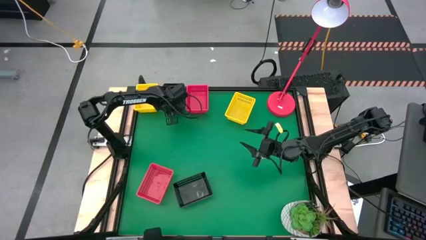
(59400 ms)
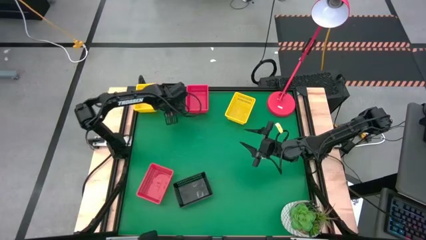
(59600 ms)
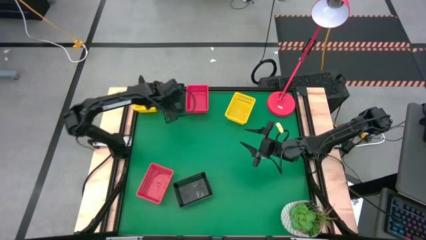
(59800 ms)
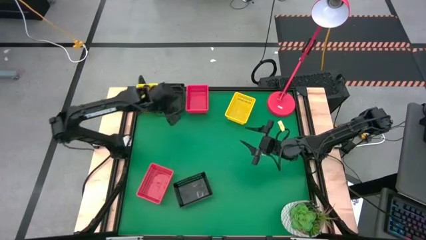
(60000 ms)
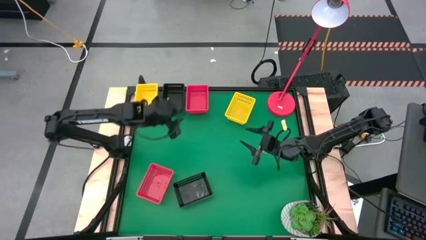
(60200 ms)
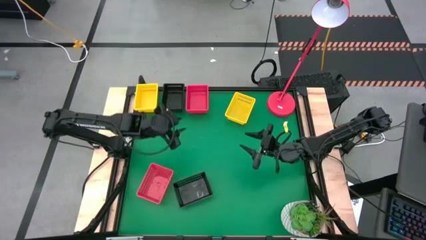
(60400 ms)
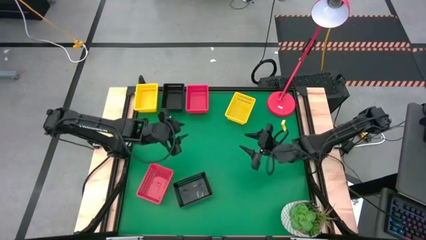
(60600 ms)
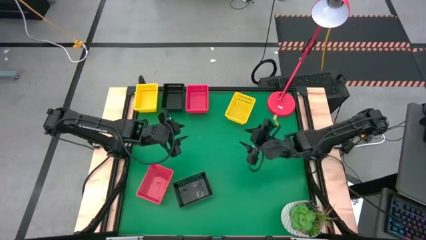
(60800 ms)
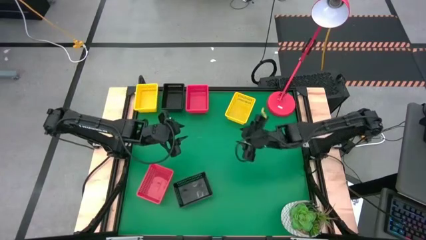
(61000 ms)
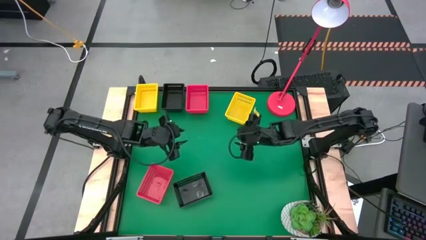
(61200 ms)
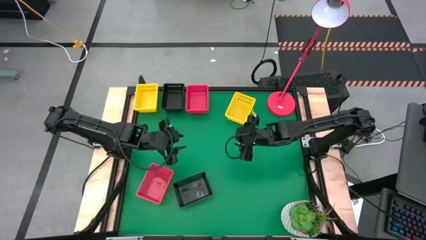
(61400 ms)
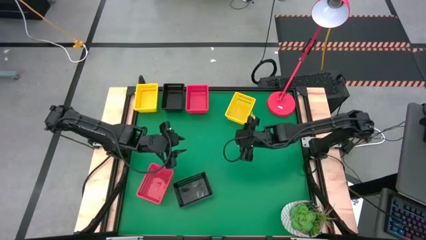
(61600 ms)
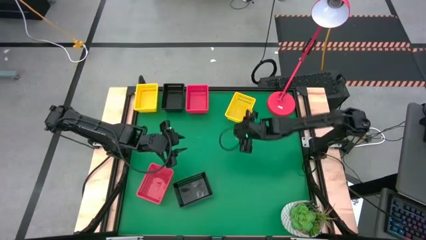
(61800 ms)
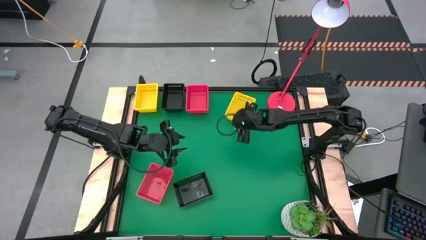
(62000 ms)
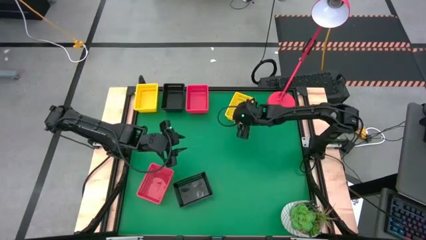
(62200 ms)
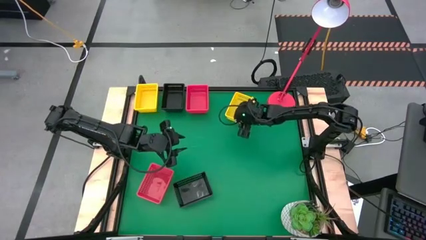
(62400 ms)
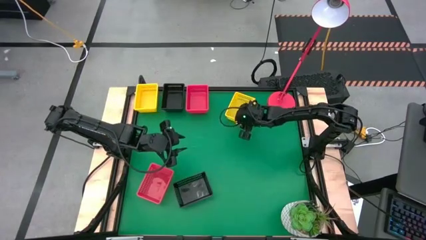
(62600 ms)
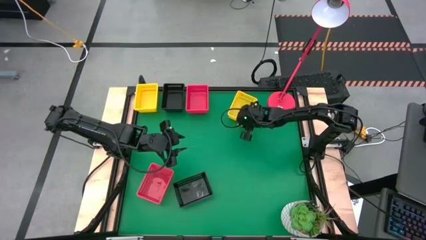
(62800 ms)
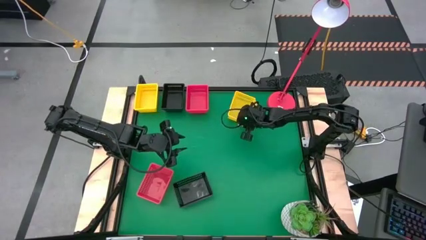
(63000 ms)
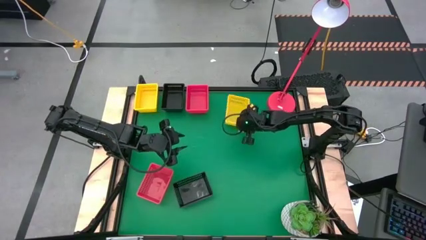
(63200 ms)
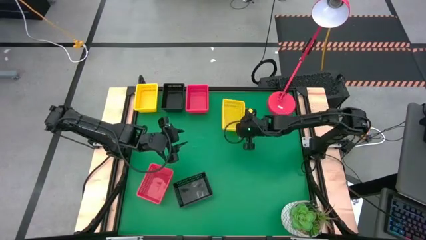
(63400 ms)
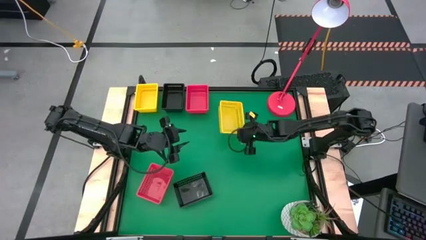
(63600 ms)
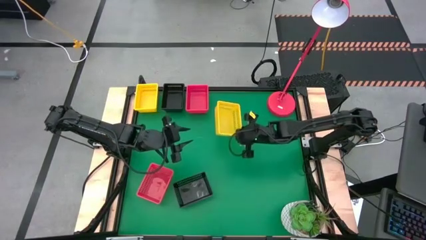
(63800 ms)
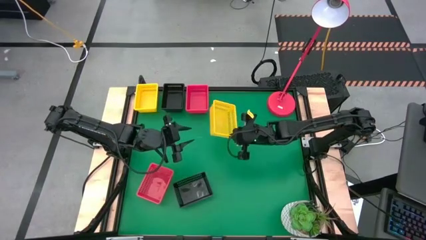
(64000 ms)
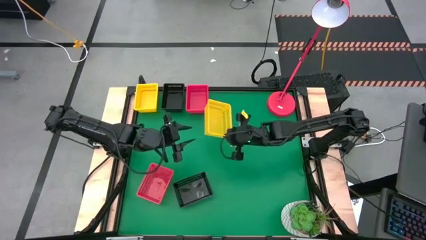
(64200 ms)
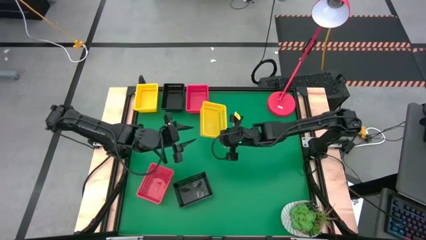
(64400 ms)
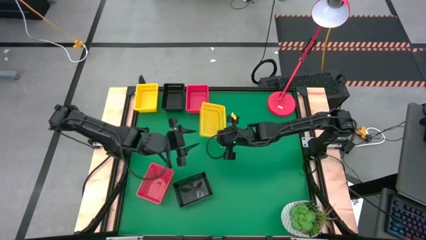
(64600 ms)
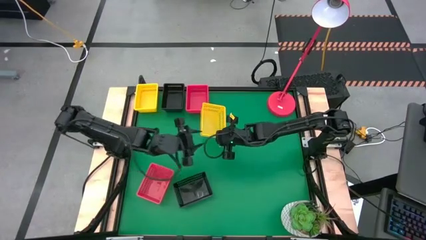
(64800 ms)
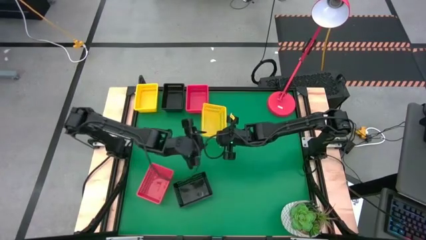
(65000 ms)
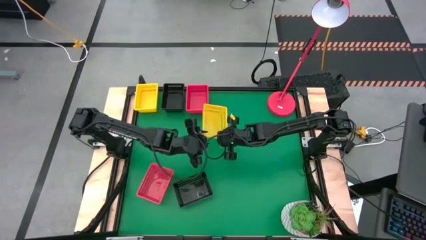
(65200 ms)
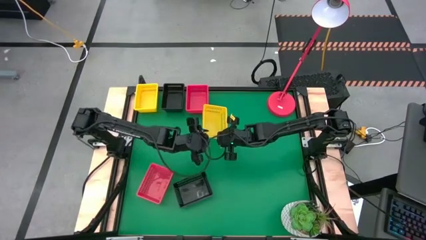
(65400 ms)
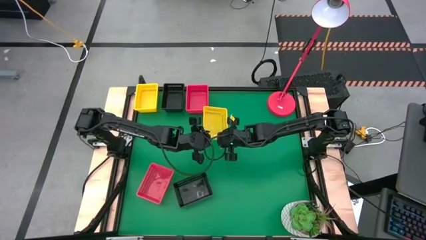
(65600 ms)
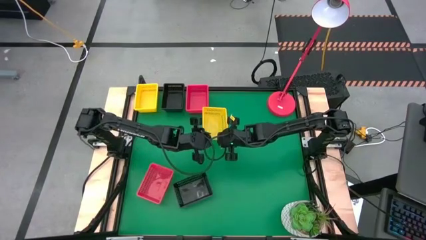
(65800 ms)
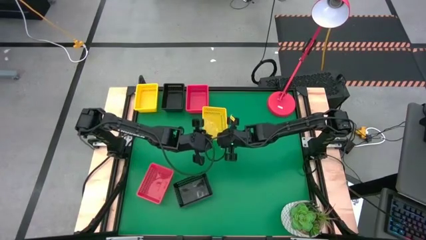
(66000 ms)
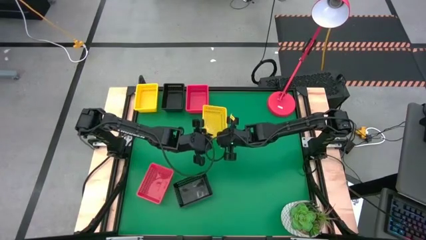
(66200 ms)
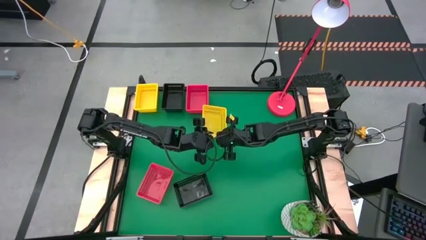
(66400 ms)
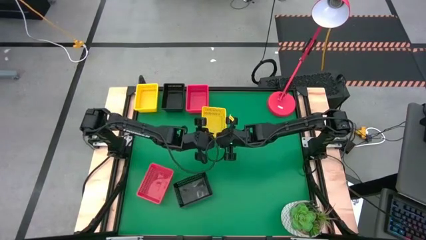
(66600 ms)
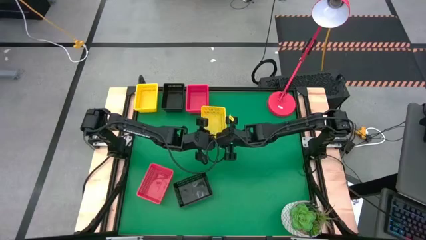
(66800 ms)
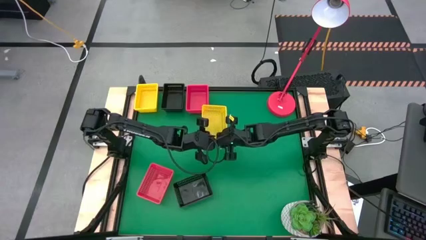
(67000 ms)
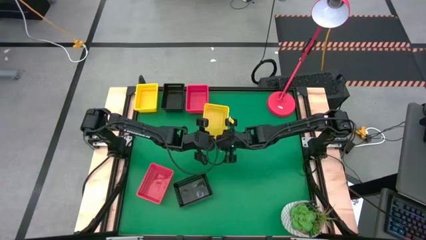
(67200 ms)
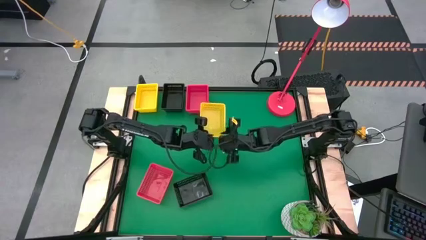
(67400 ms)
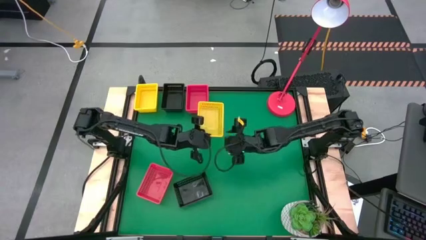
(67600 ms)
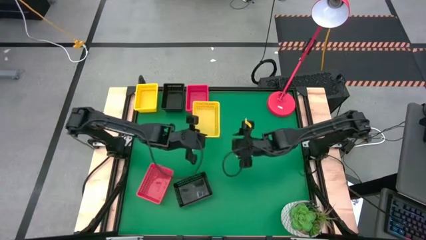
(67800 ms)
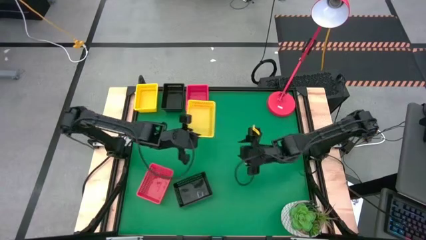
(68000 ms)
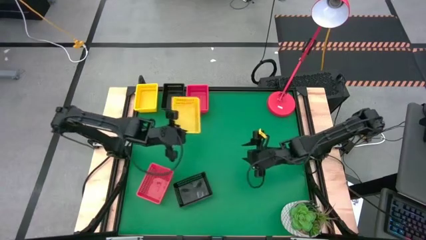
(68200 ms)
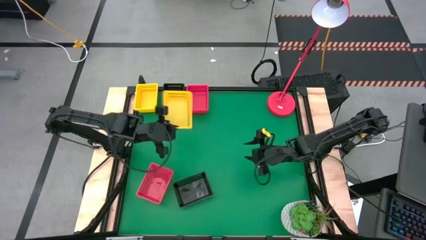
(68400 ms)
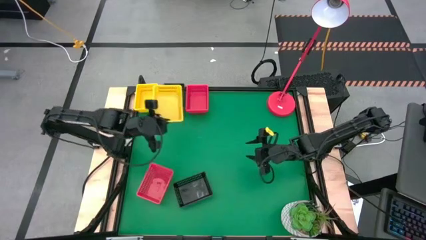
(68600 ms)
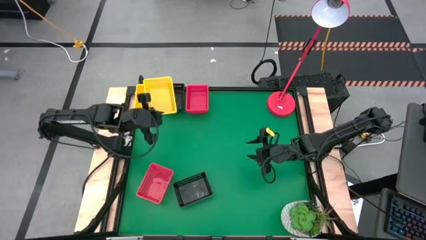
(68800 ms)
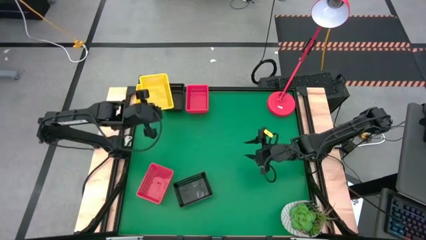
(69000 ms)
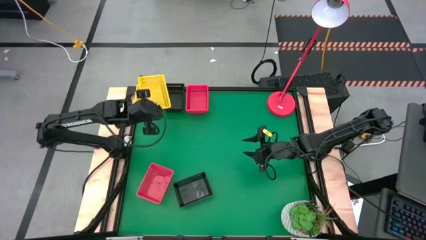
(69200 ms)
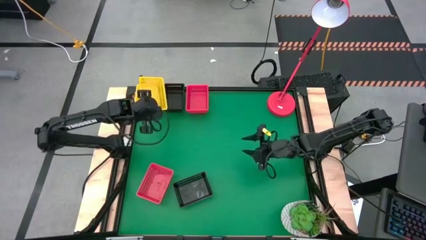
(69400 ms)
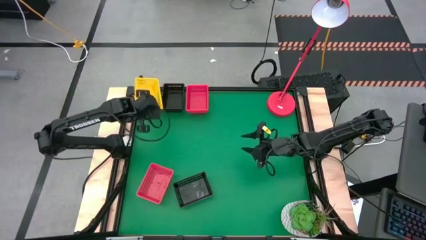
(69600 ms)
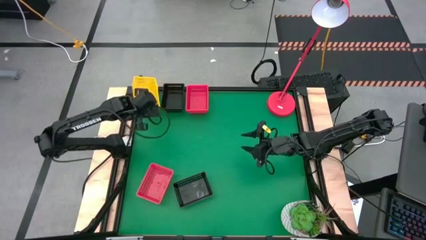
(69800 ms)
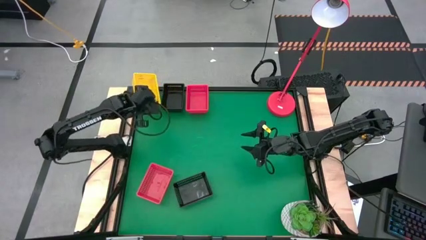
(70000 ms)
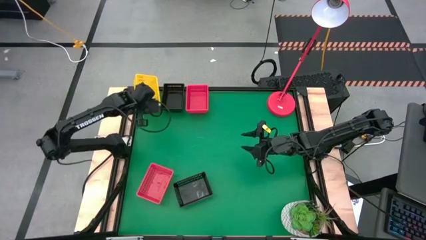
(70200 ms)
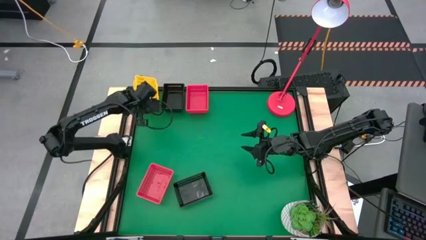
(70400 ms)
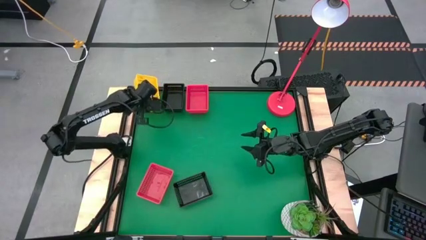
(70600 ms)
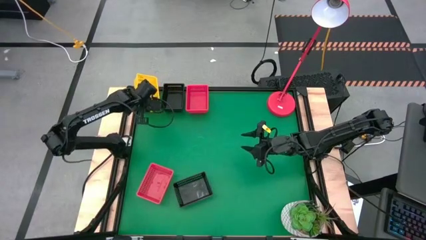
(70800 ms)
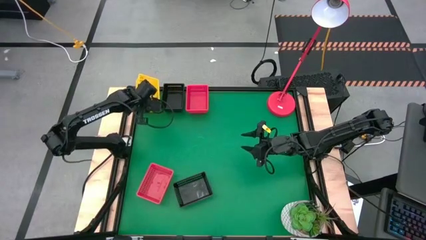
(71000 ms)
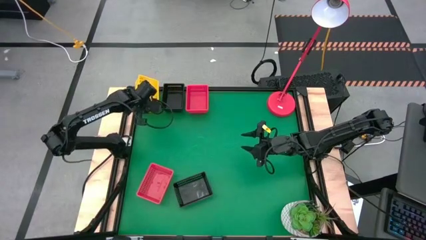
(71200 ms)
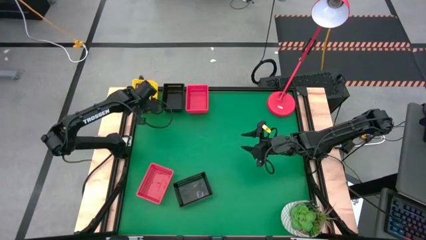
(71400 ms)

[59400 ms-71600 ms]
Stack the right yellow bin on top of the left yellow bin
